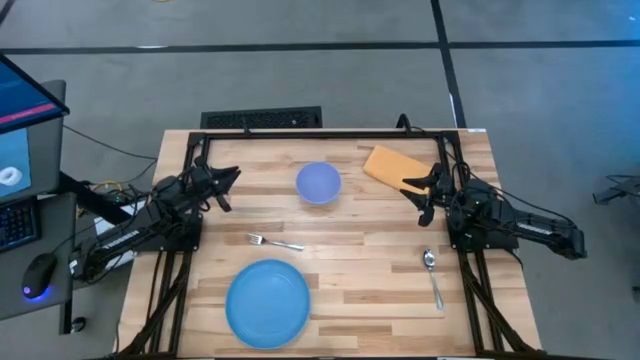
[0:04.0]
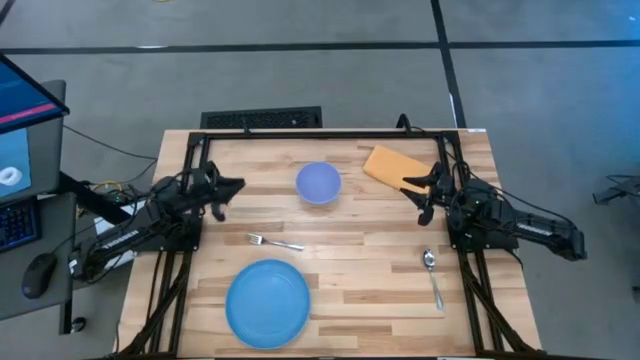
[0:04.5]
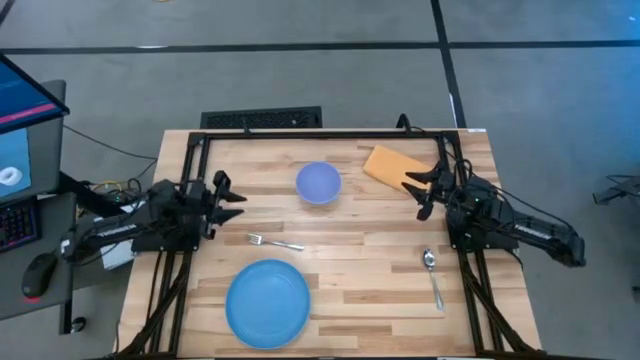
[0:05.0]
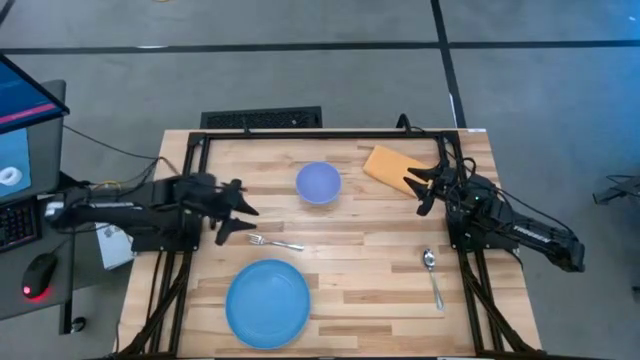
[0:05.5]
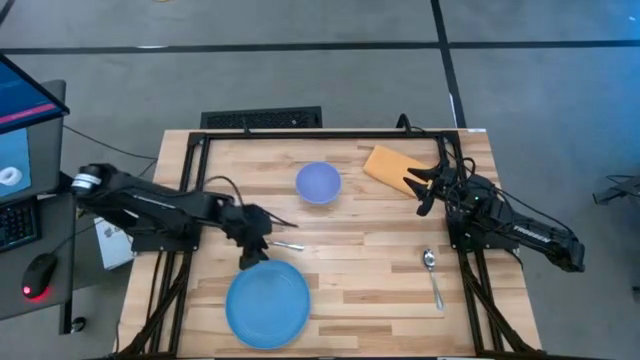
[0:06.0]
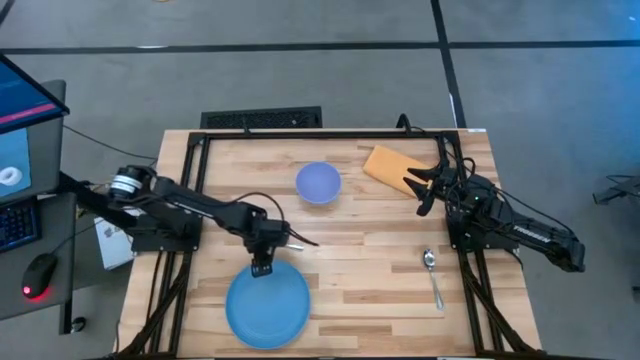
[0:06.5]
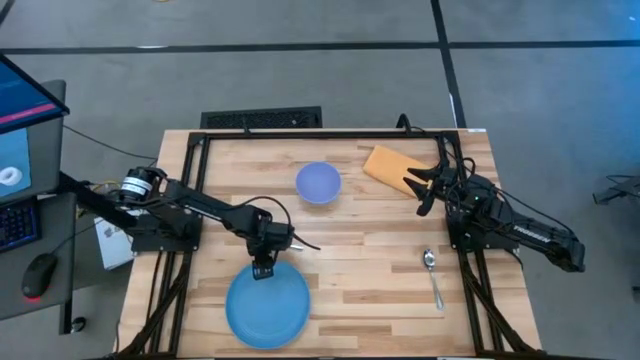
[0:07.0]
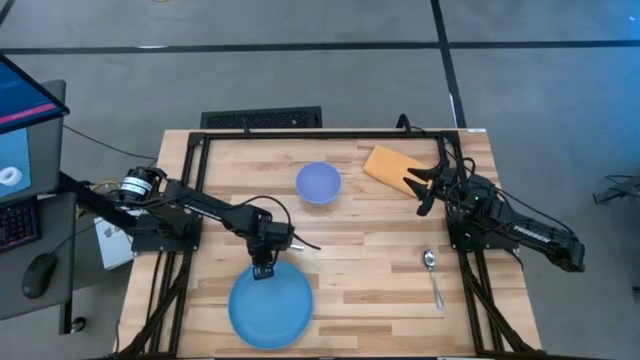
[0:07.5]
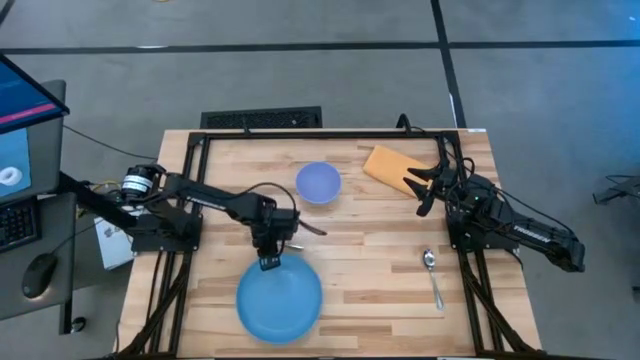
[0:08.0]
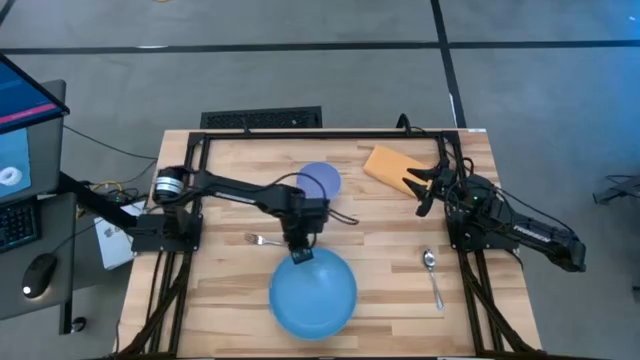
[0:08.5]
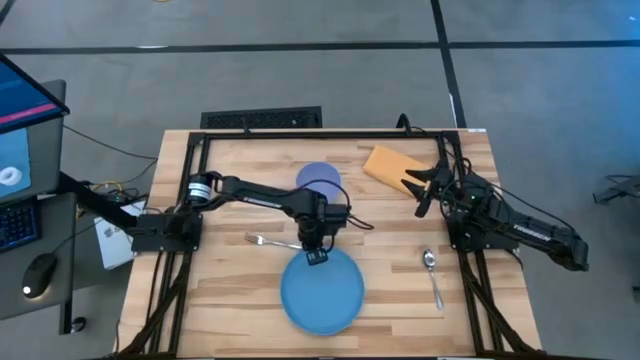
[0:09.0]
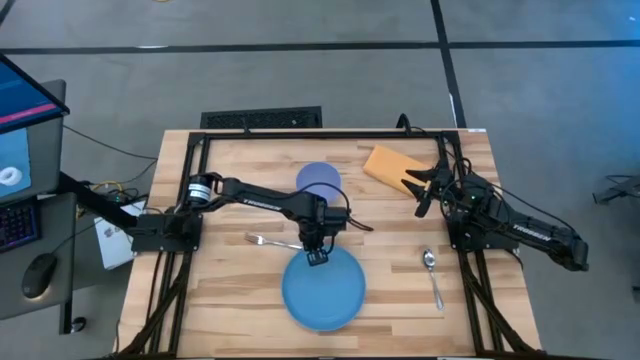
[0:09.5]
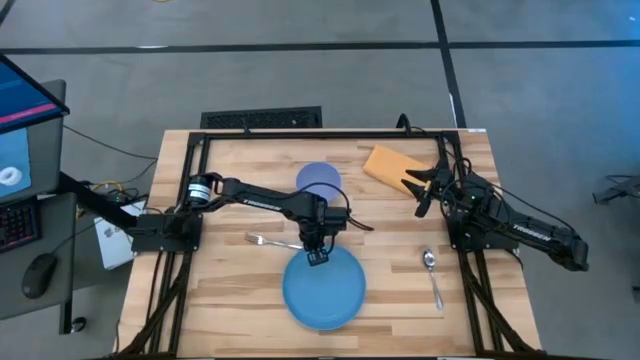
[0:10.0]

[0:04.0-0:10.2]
Task: Set table place
Move the blue plate to the center of the table

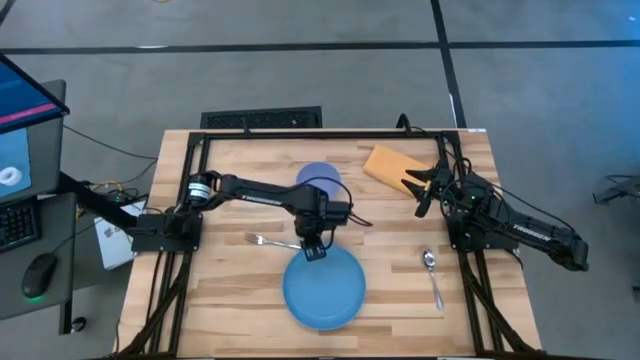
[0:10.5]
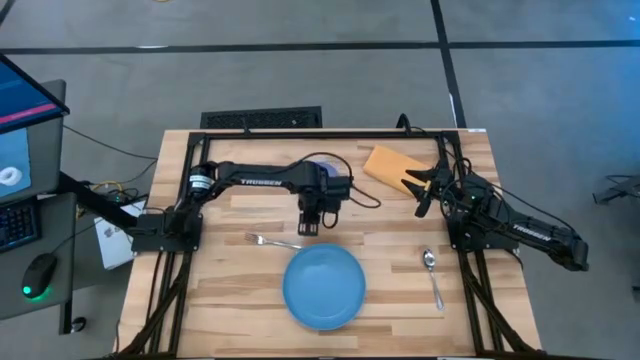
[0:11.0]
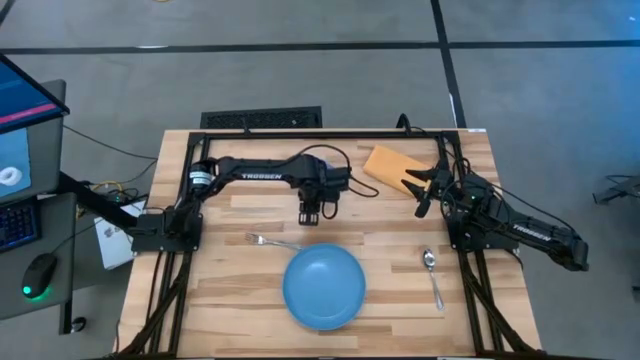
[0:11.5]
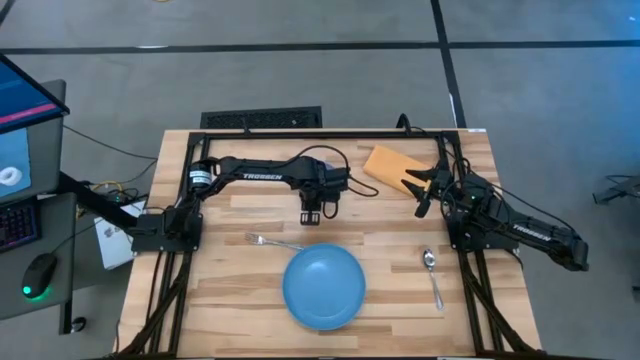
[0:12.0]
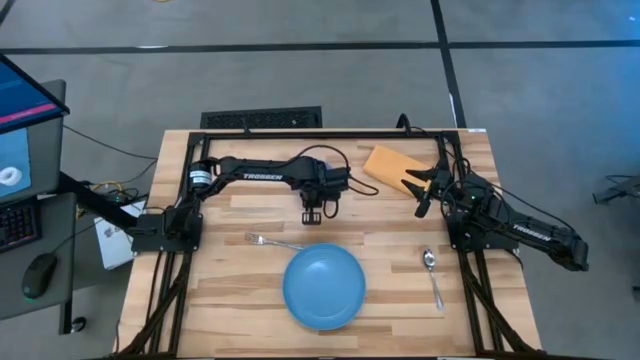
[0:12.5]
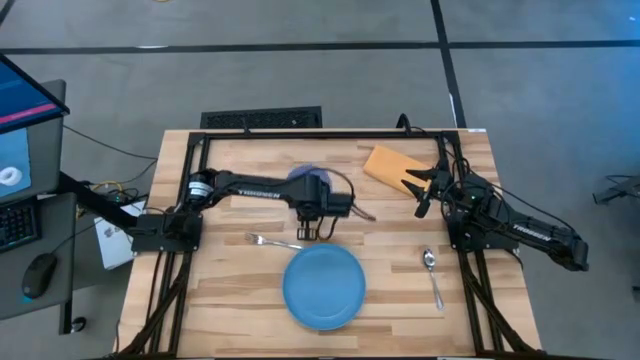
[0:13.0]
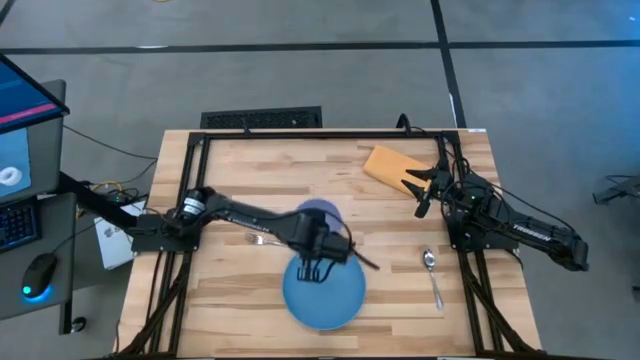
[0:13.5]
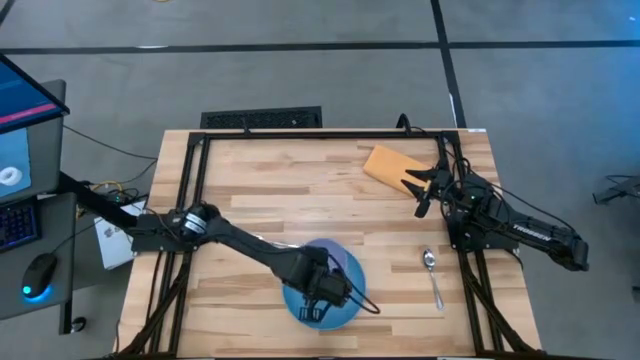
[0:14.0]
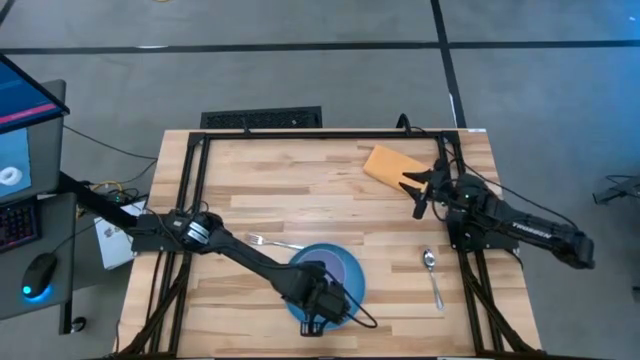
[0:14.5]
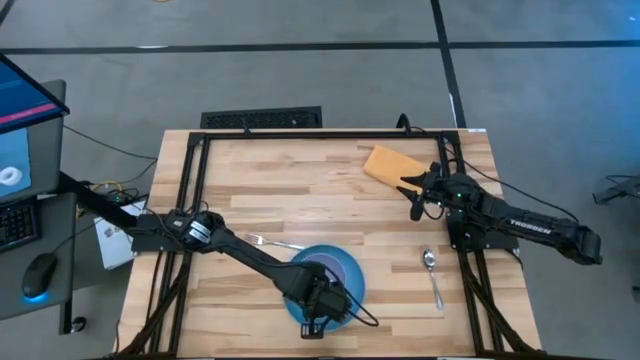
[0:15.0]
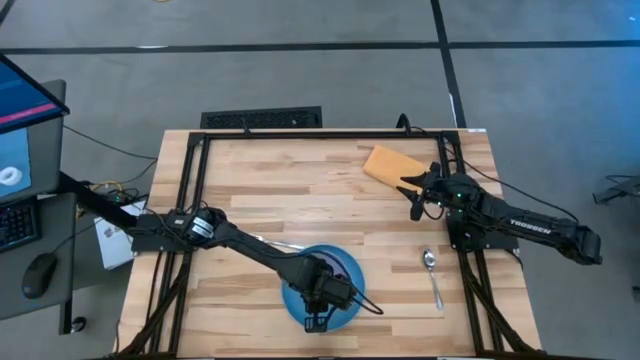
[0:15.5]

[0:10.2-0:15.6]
Put the purple bowl into the blue plate

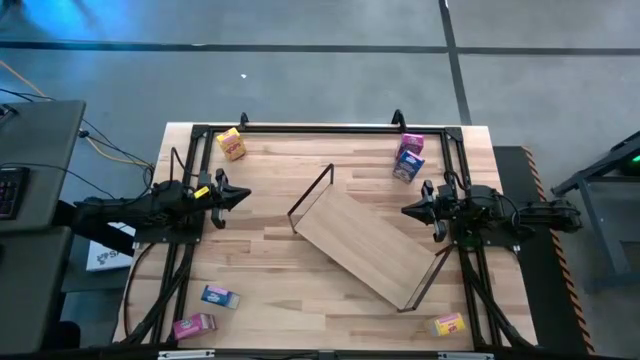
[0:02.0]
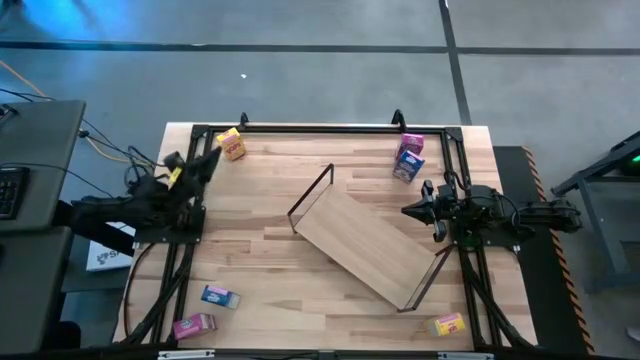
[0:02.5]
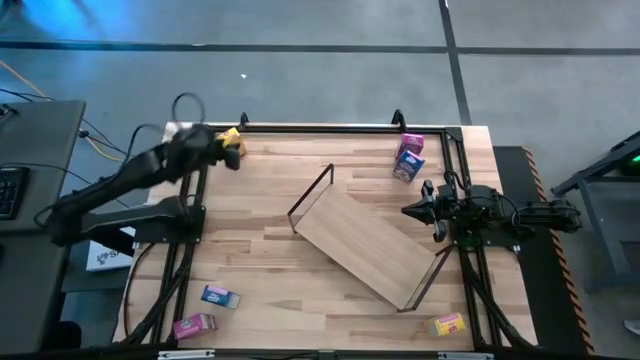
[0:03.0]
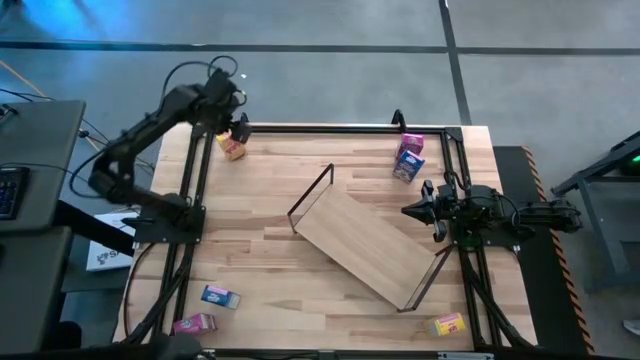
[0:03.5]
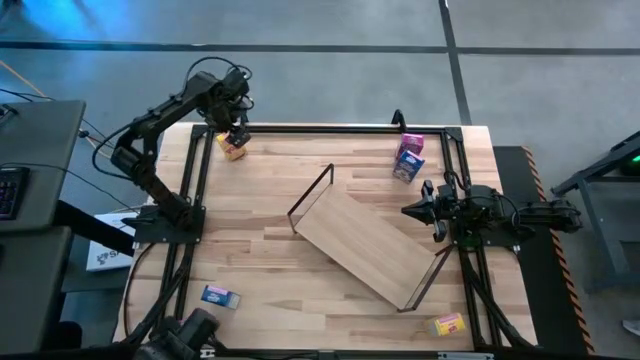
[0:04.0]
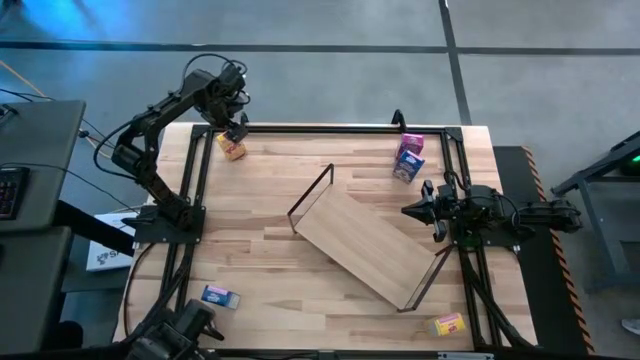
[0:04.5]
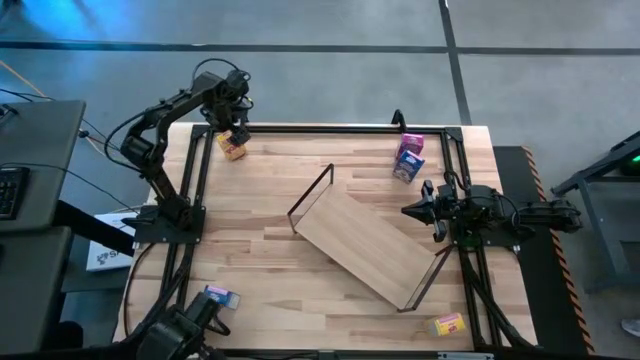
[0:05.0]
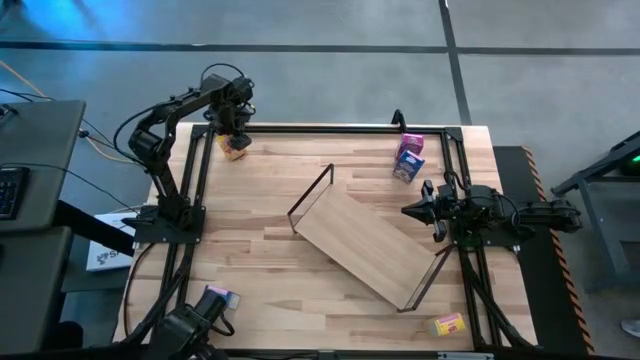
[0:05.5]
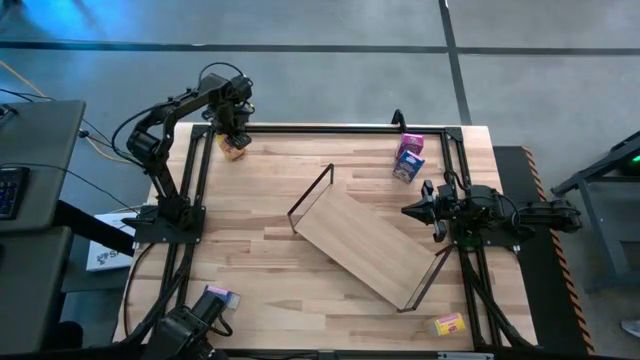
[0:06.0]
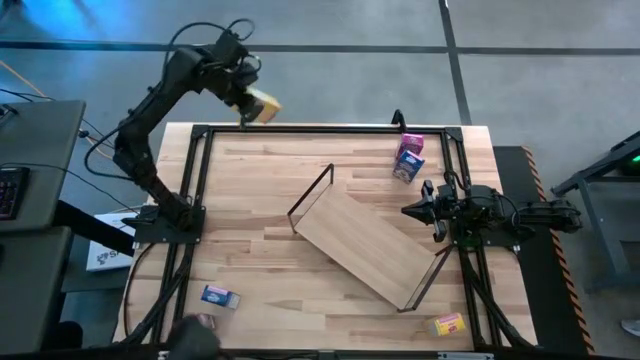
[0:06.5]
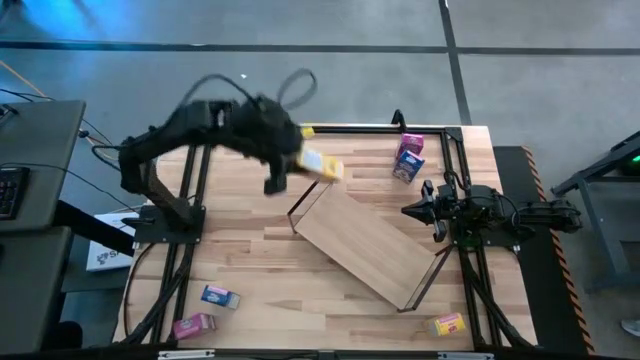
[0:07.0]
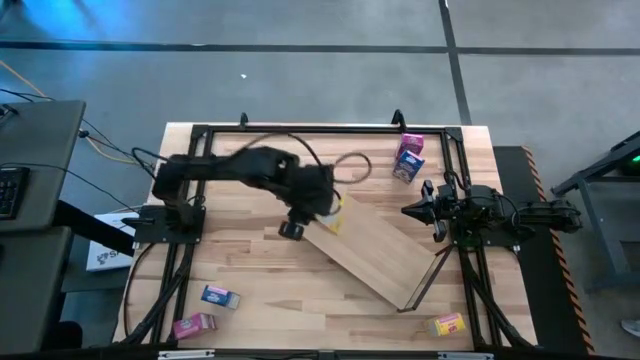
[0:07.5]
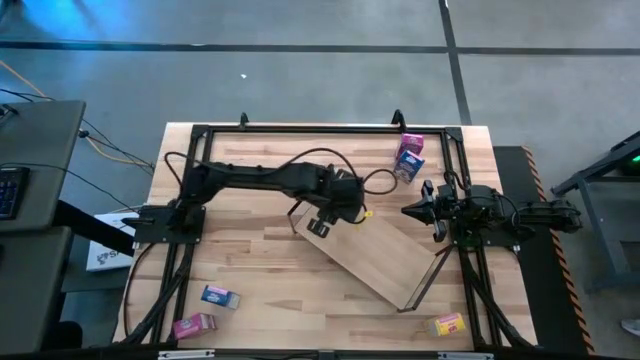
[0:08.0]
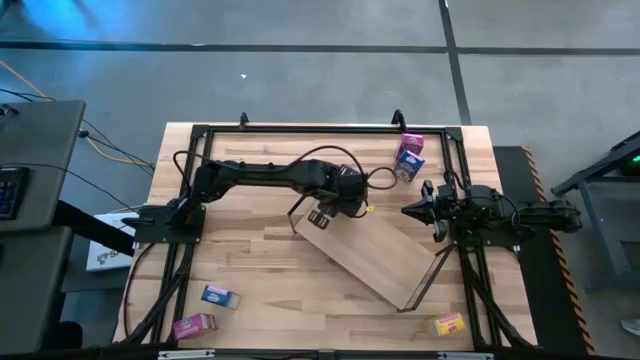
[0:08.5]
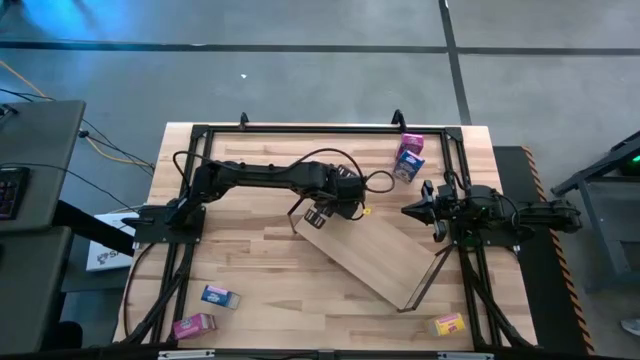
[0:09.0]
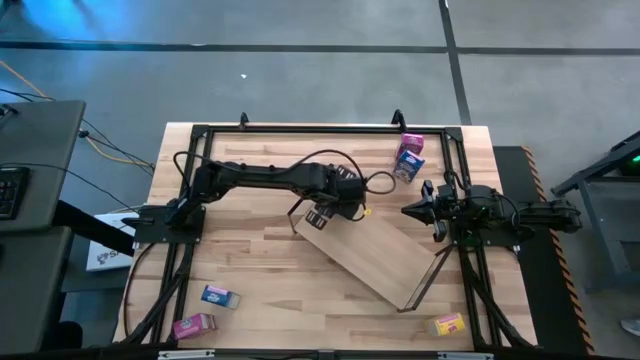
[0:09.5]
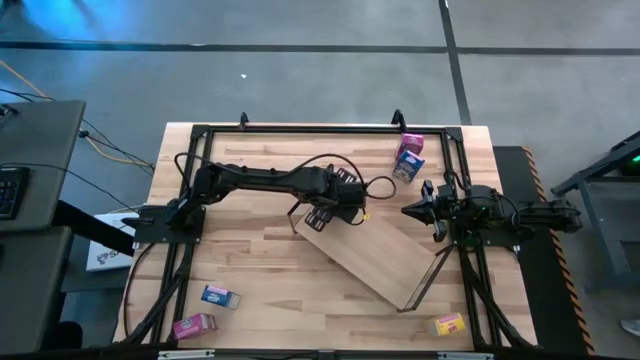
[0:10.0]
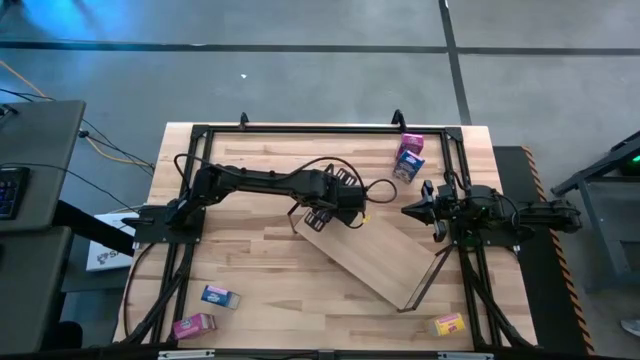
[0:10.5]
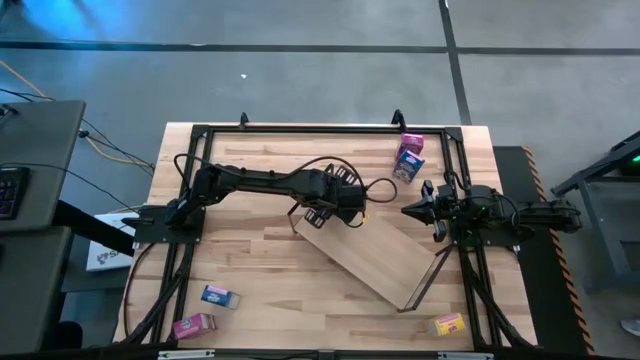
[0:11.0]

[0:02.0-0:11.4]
Task: Stack cereal on shelf
Put the top yellow cereal box on the shelf
